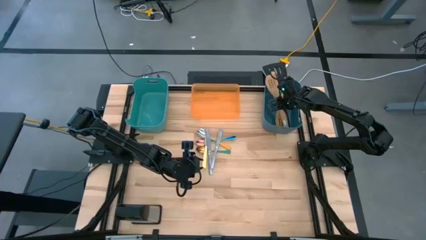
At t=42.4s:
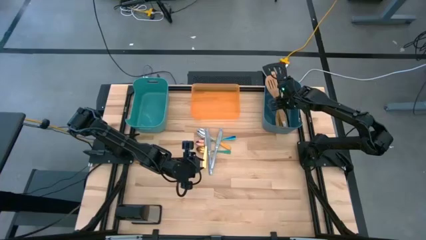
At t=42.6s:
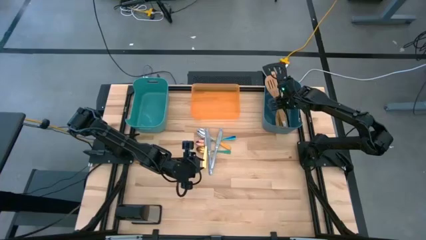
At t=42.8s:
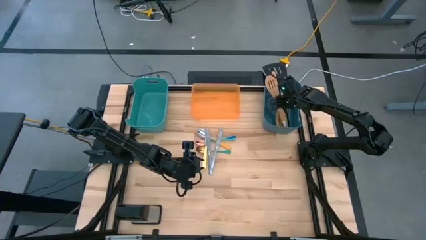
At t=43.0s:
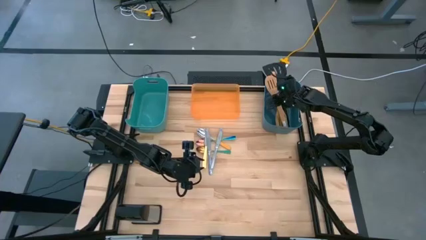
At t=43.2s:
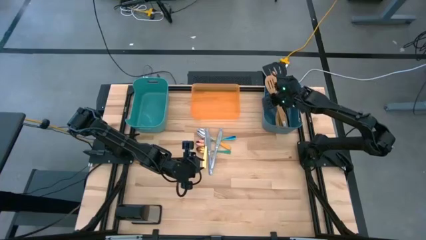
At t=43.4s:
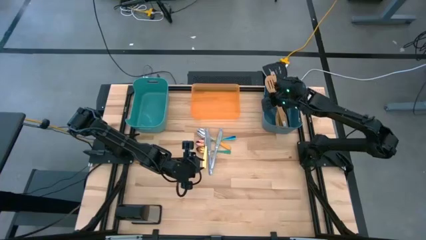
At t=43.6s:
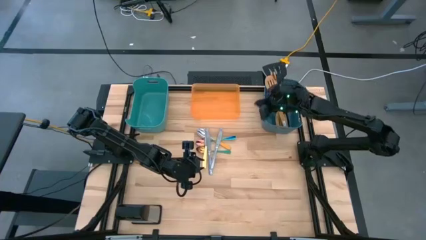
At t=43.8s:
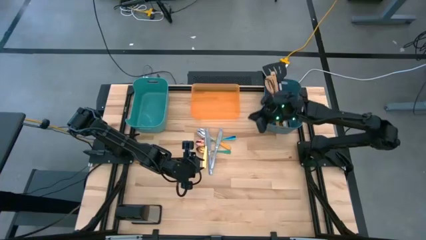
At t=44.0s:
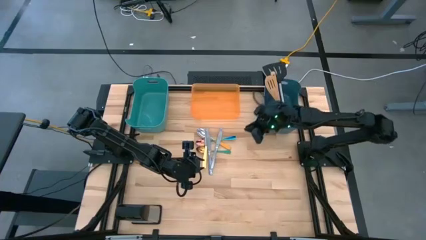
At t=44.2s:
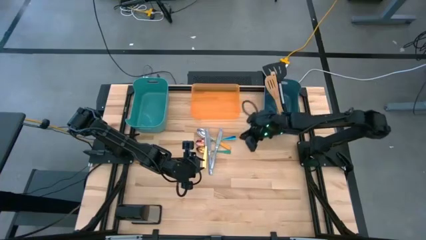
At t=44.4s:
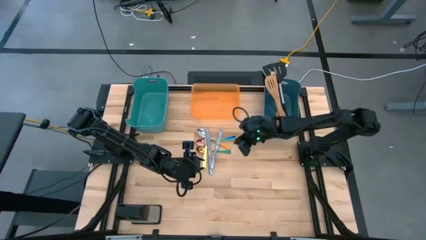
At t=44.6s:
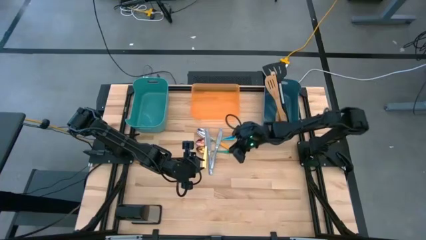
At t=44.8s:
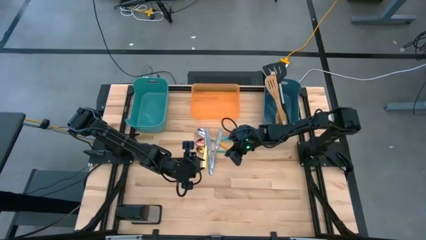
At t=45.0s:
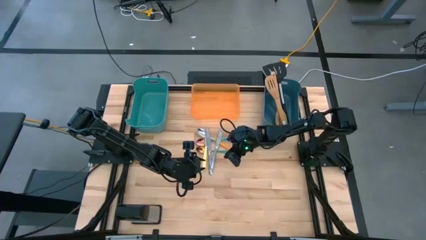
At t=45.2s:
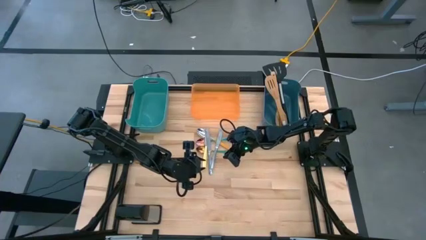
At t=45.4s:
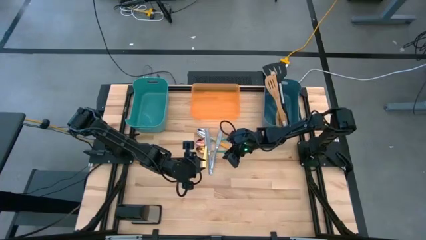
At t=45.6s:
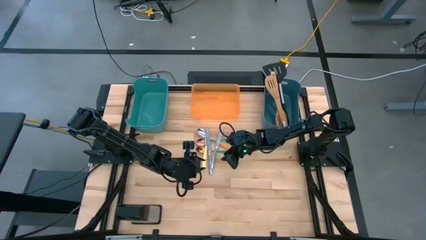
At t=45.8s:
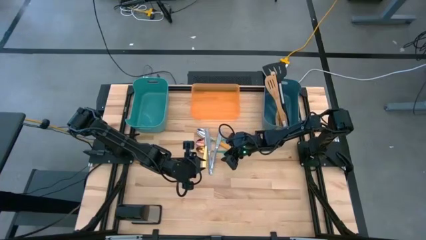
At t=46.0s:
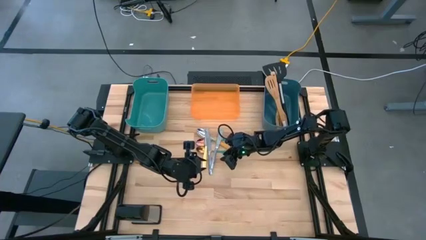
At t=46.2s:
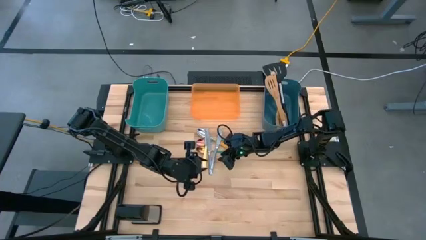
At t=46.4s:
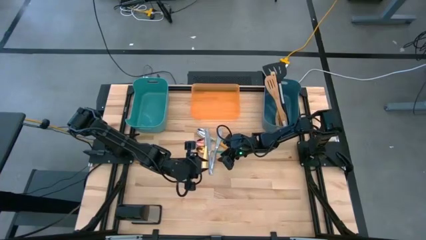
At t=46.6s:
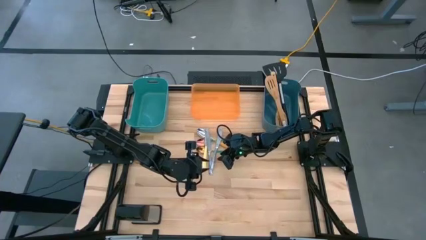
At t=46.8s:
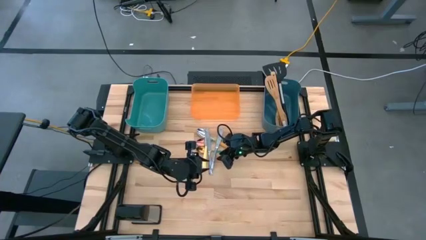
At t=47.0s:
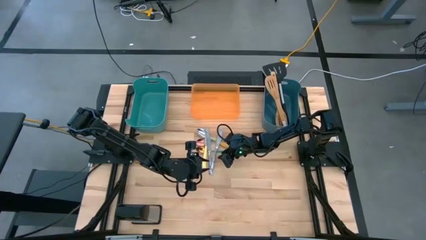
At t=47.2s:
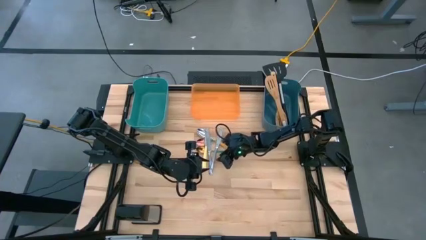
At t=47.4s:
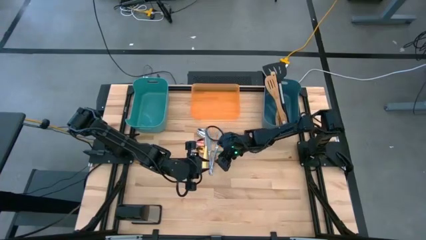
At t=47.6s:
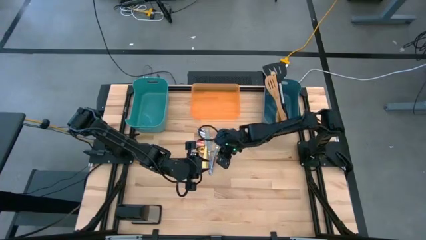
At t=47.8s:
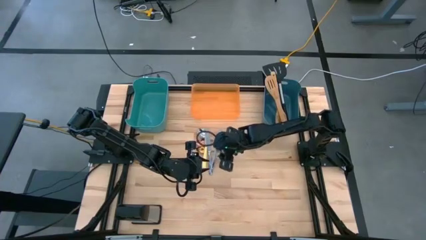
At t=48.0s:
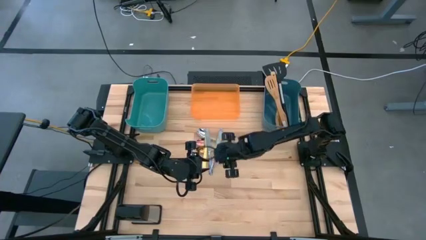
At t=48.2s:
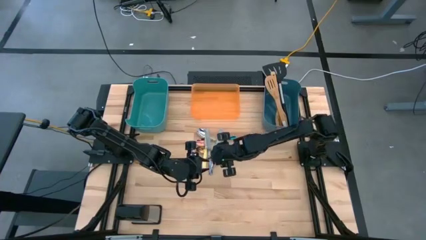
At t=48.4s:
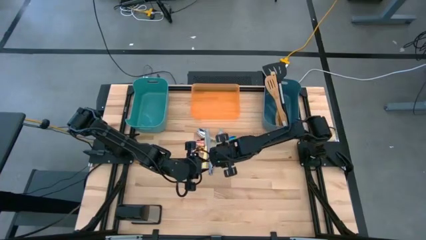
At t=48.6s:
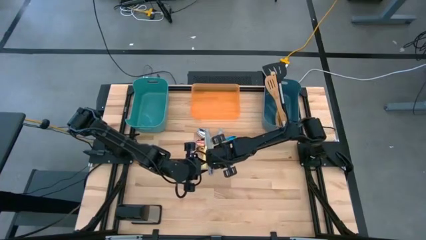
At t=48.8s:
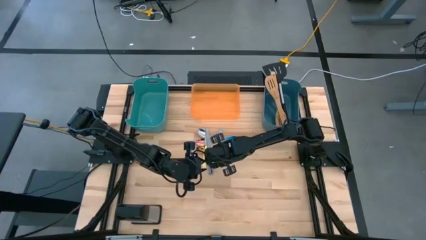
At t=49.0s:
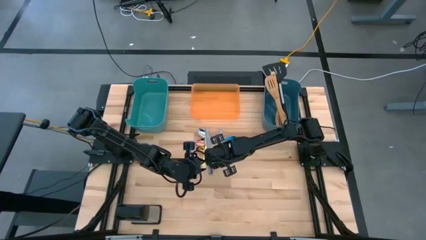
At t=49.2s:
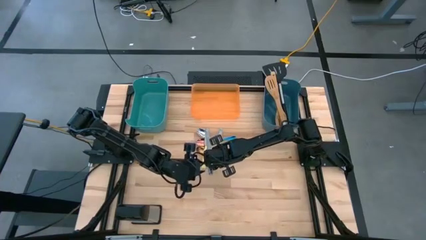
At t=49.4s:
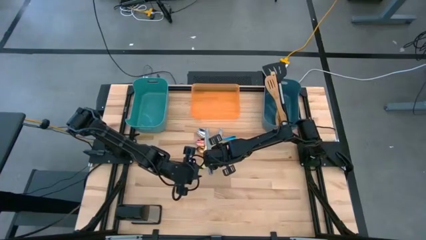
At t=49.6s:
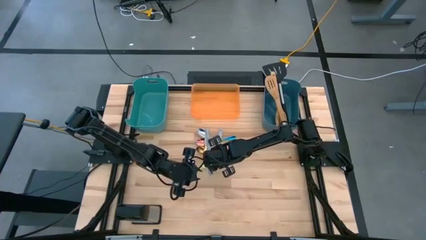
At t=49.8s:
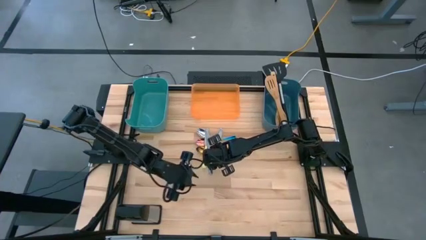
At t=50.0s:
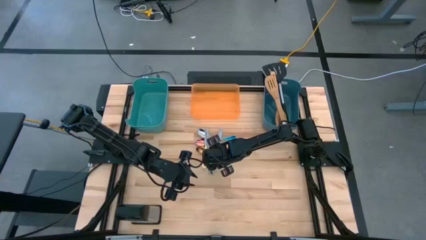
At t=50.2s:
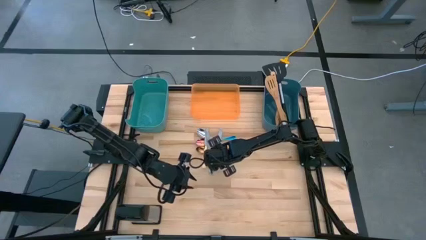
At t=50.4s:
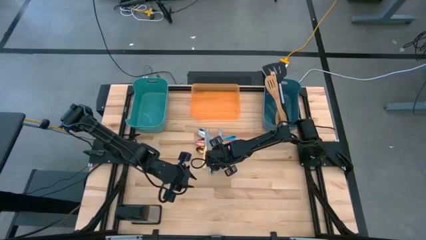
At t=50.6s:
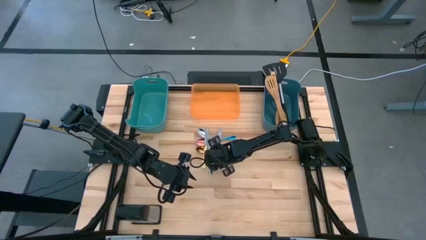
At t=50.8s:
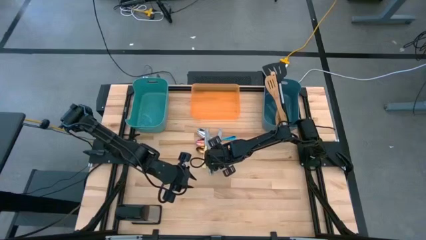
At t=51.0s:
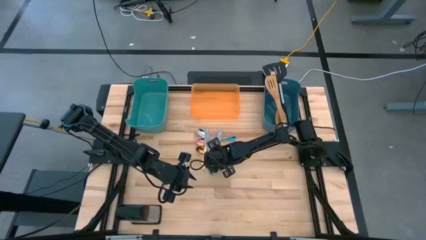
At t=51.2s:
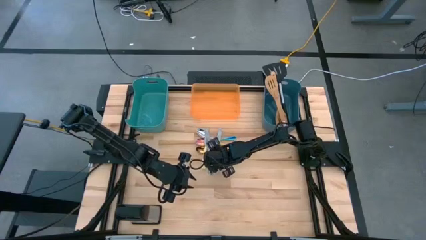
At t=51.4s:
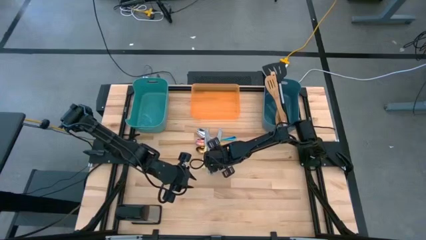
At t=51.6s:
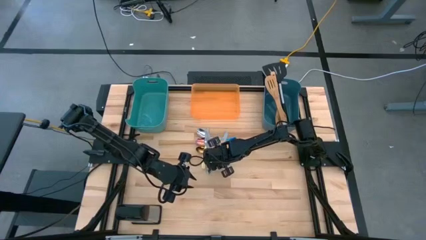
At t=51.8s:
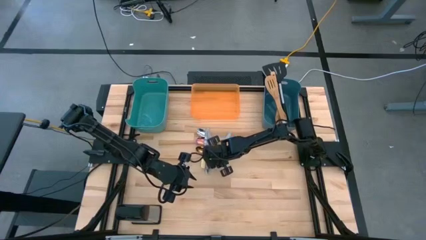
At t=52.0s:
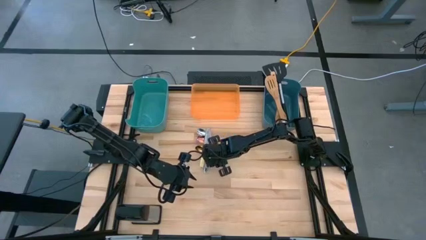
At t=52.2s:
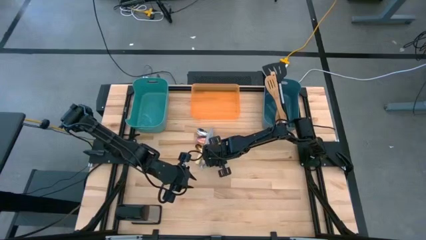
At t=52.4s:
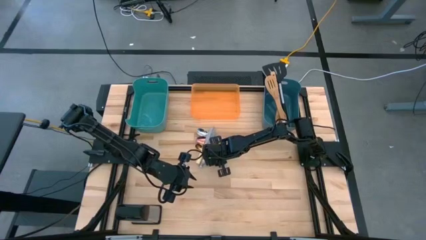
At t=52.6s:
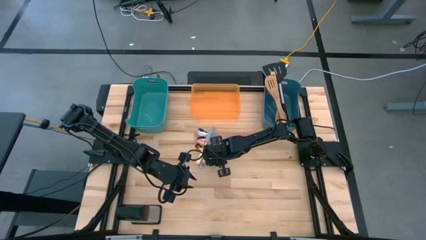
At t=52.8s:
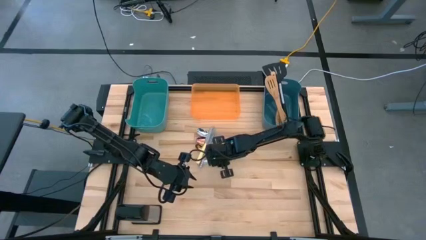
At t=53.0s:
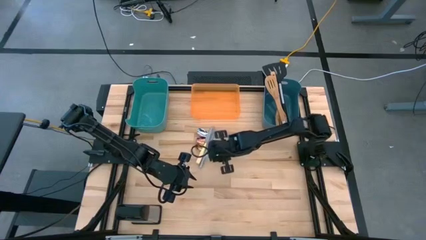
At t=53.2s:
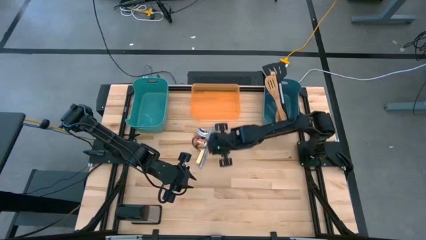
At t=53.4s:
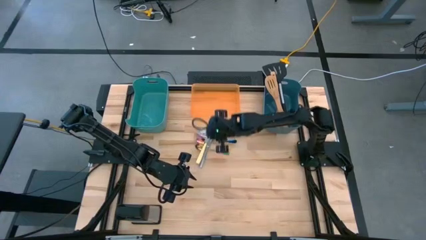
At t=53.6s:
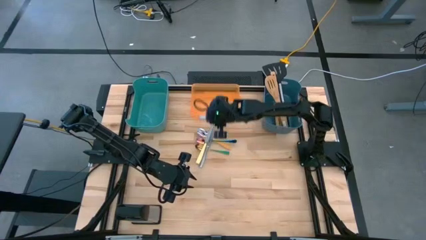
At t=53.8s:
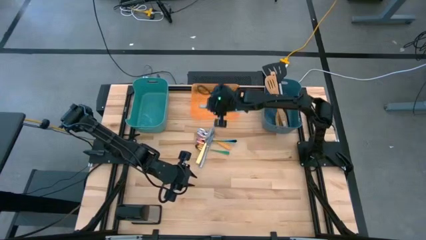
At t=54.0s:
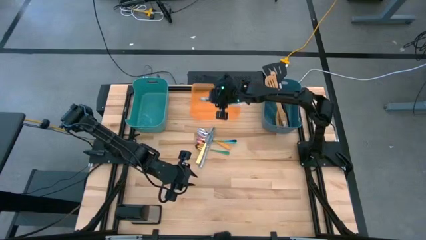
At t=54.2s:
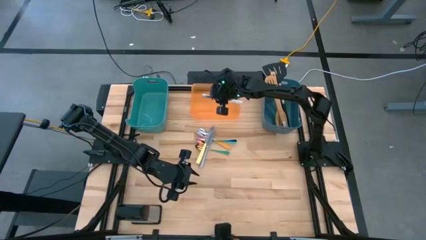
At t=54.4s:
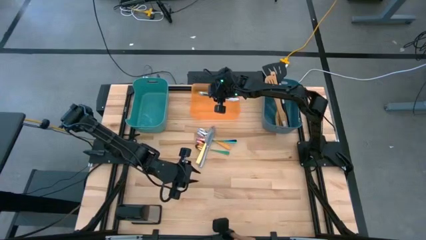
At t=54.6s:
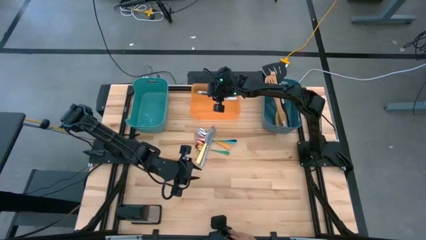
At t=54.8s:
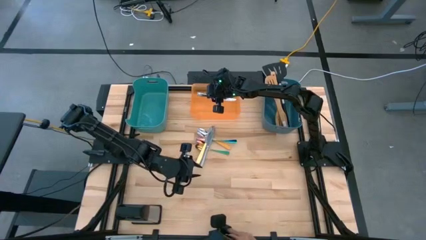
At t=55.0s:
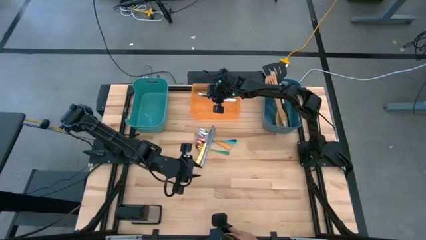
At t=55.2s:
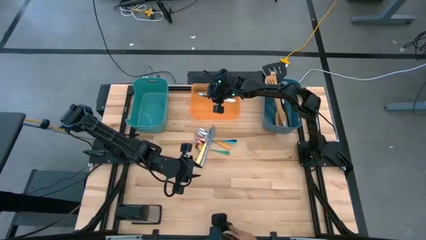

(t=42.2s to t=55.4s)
Task: Pick & Place Kitchen Items
Put the right silver knife into the orange bin
